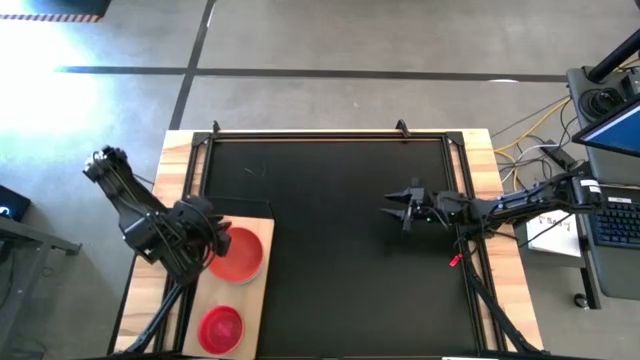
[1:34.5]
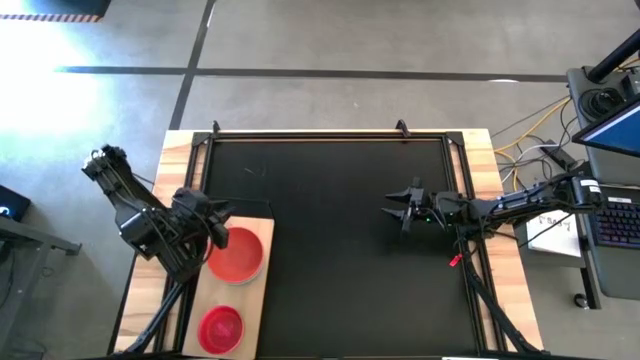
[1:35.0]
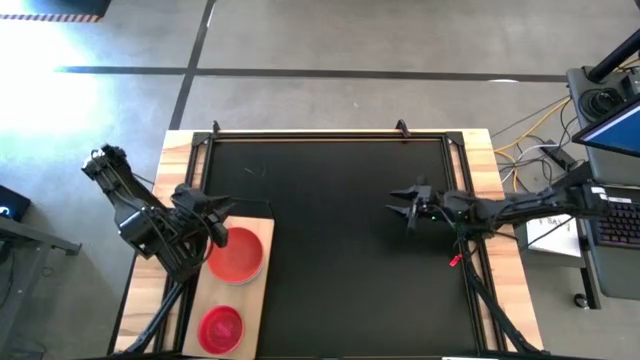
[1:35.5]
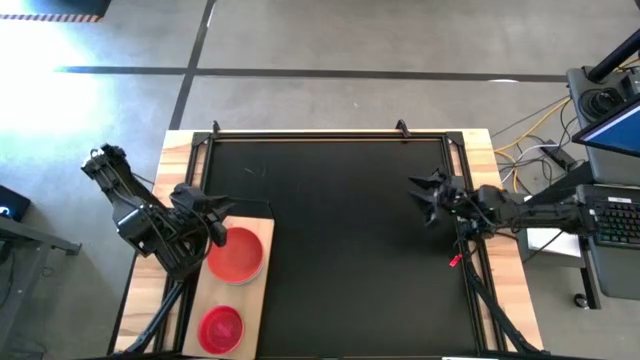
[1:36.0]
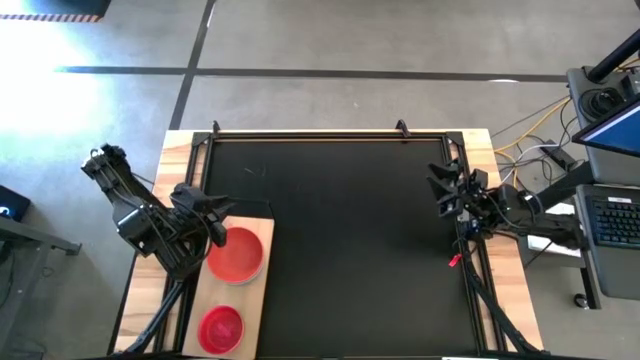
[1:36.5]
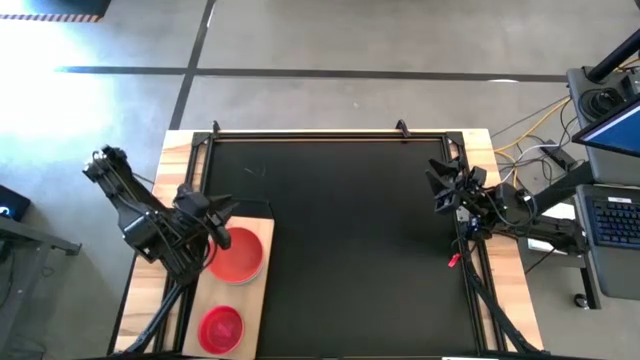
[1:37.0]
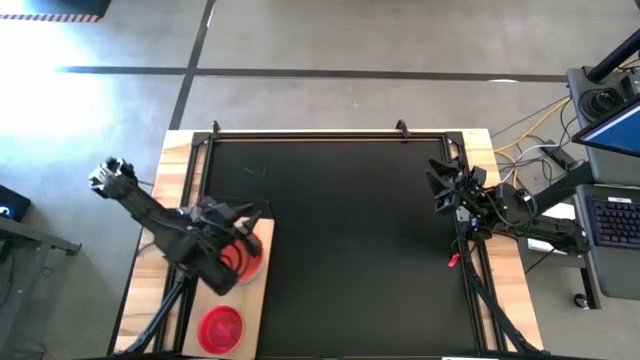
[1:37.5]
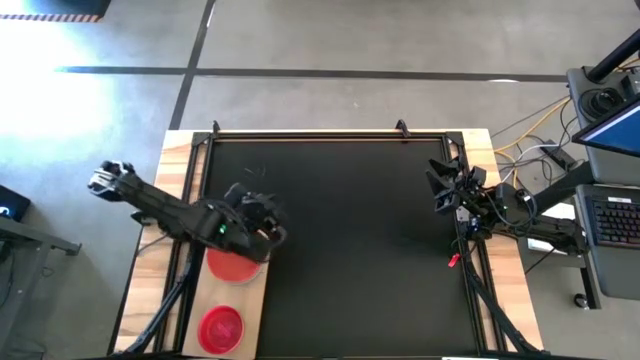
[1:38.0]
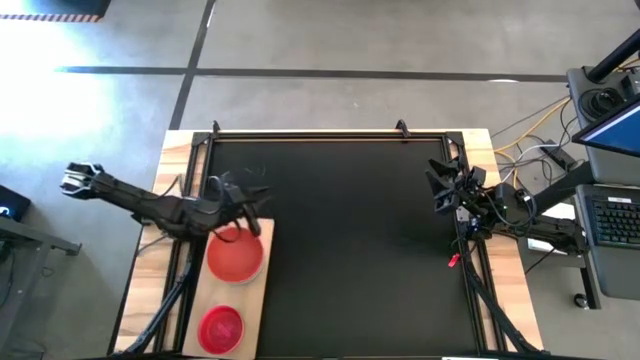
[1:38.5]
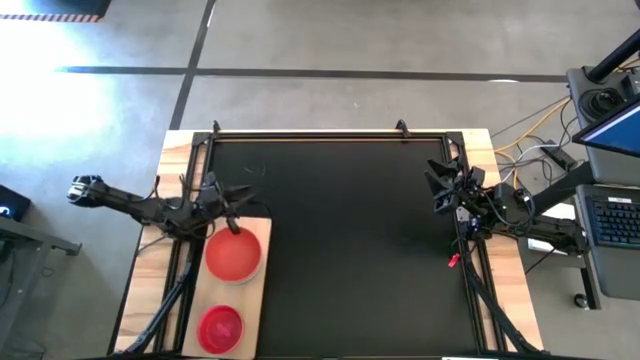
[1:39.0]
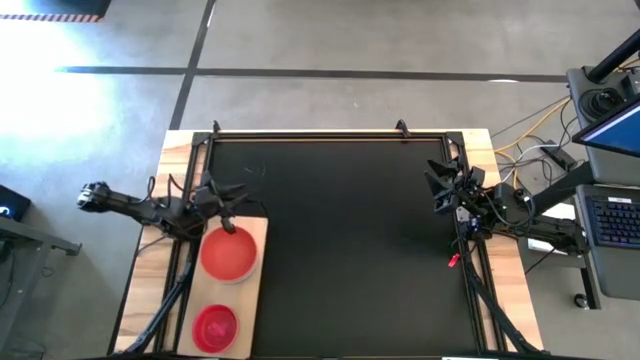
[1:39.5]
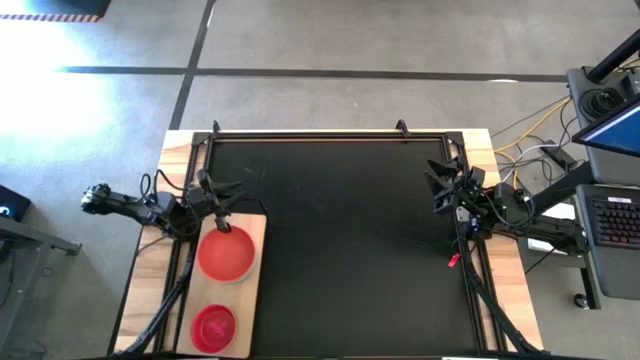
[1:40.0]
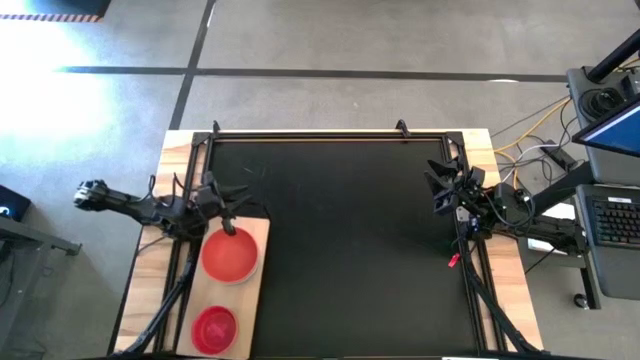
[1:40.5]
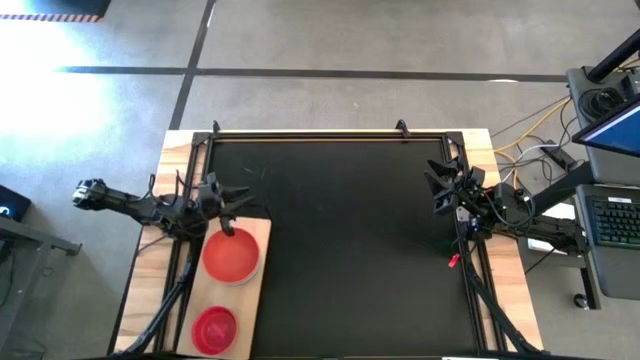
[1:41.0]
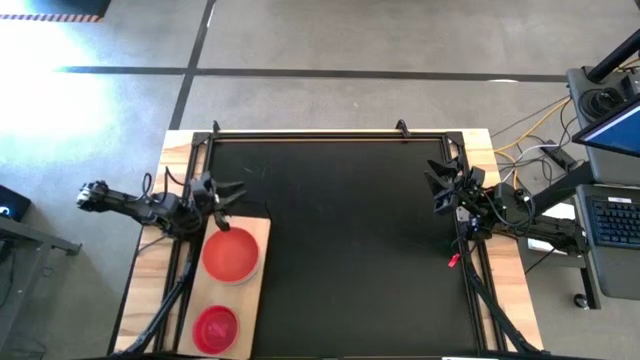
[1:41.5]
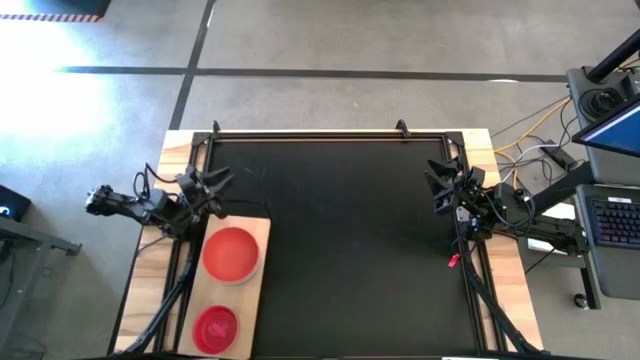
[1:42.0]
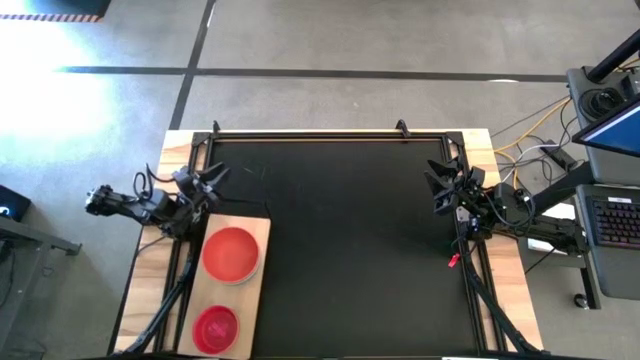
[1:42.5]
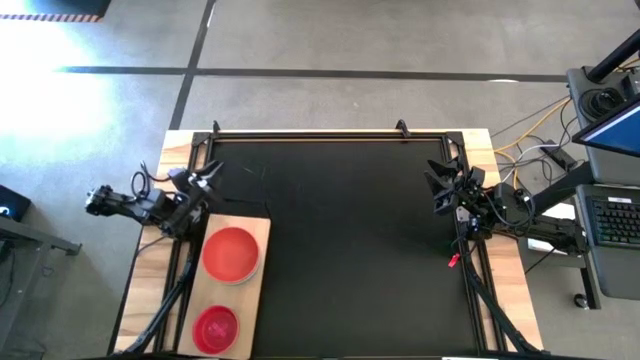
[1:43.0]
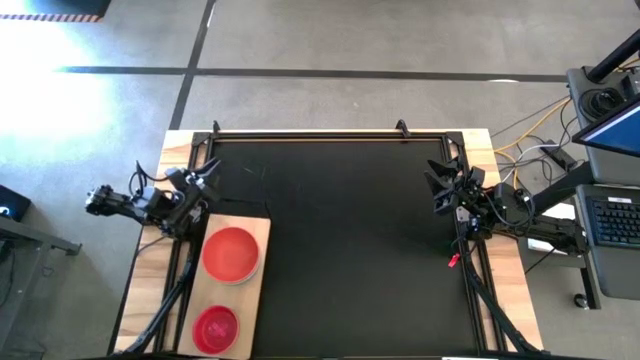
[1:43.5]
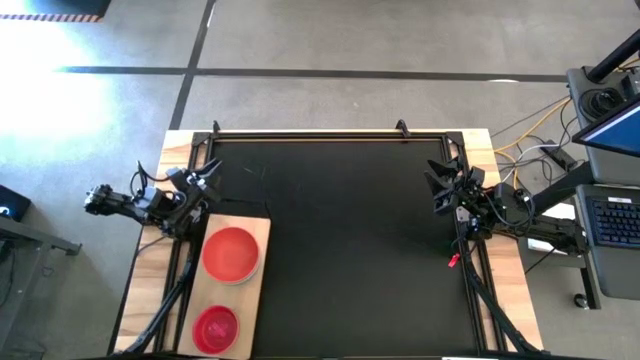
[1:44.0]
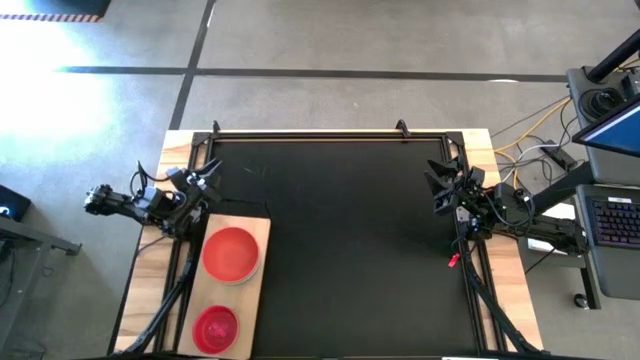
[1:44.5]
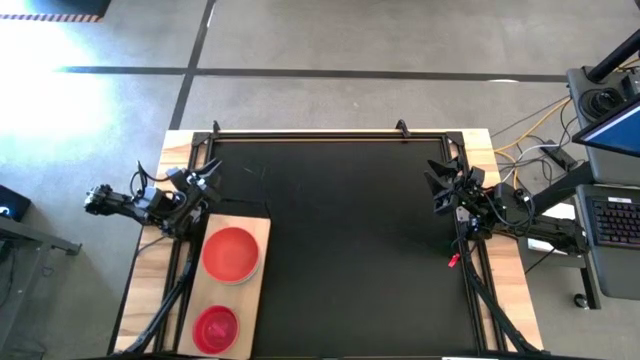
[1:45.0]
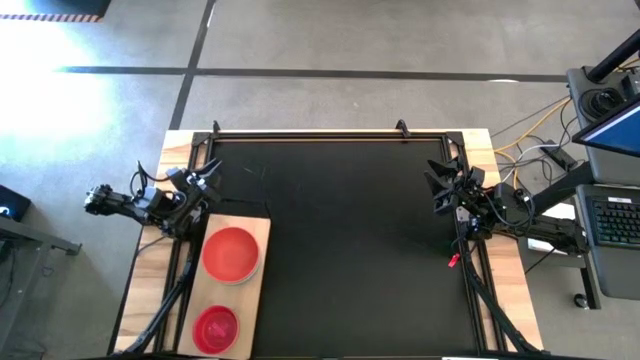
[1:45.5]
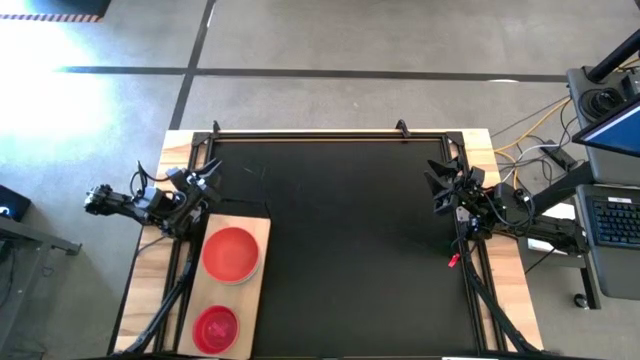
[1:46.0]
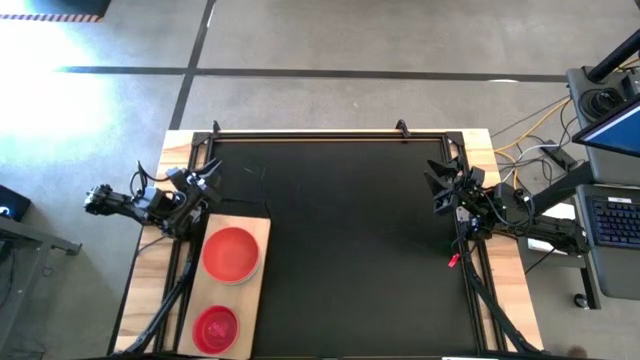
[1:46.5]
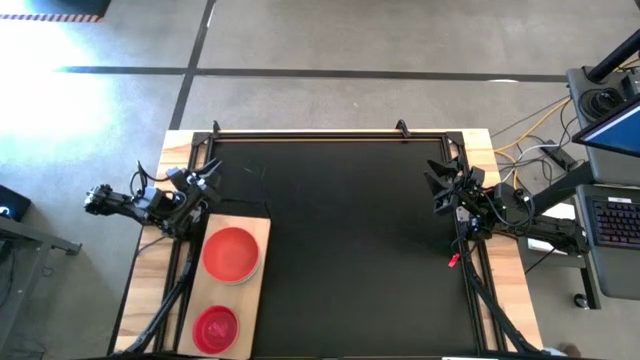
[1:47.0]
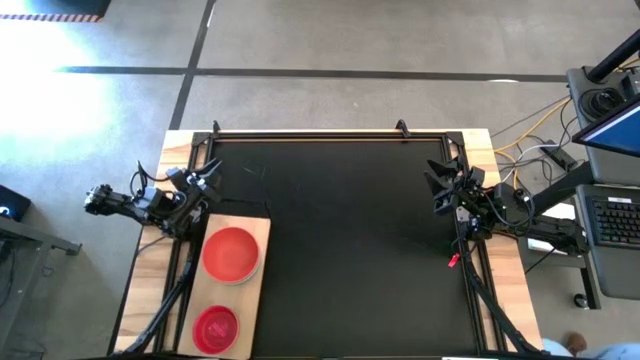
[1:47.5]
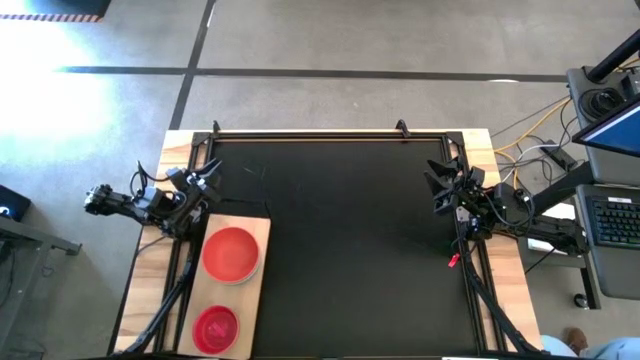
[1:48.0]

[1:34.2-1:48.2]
Task: Place and stack bowls onto a shelf
Return to Home Position

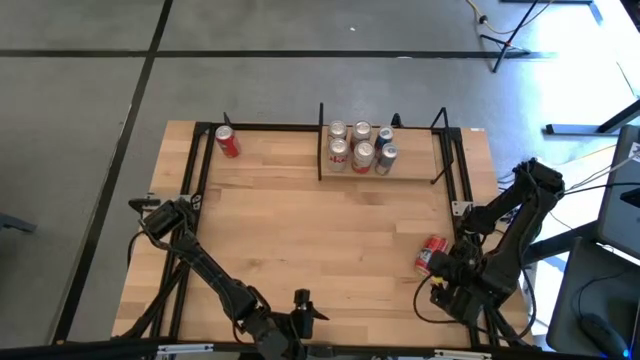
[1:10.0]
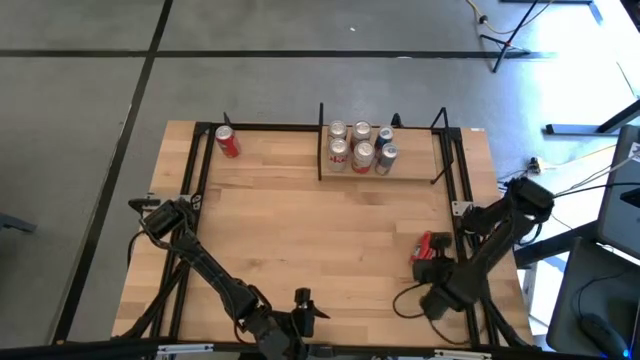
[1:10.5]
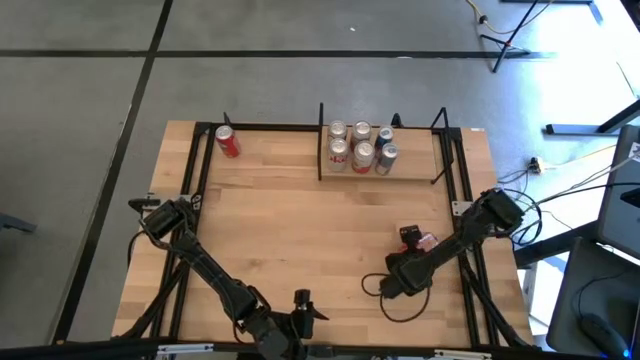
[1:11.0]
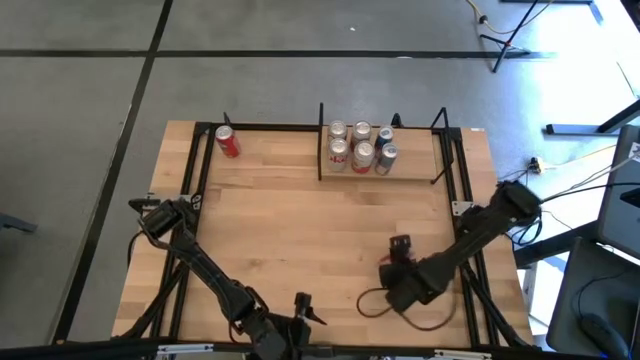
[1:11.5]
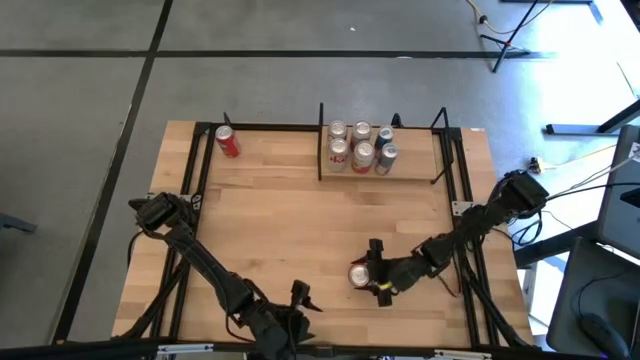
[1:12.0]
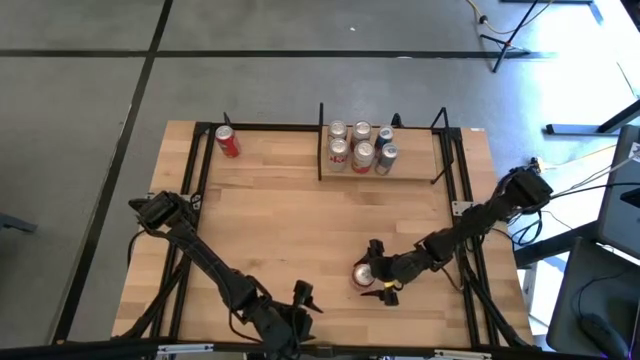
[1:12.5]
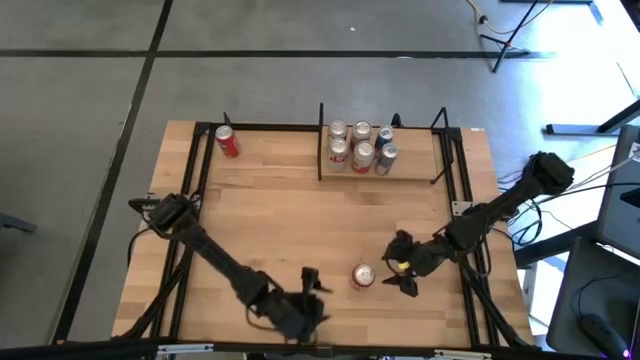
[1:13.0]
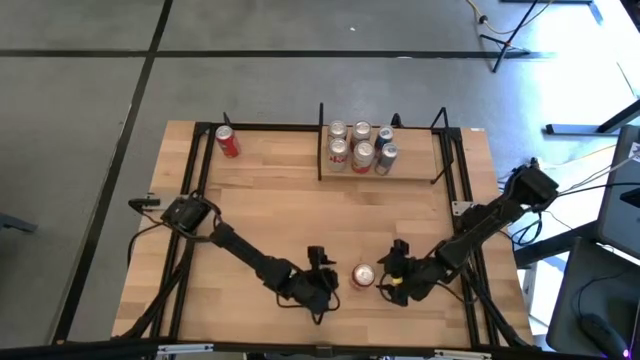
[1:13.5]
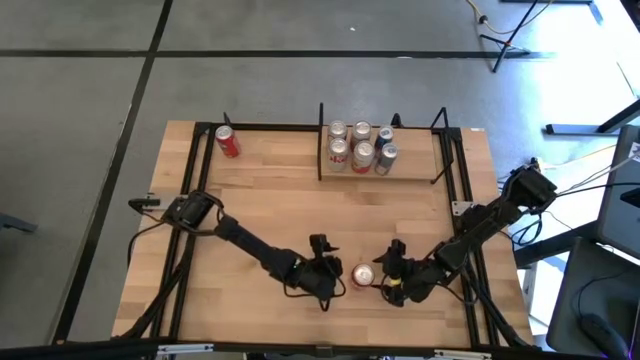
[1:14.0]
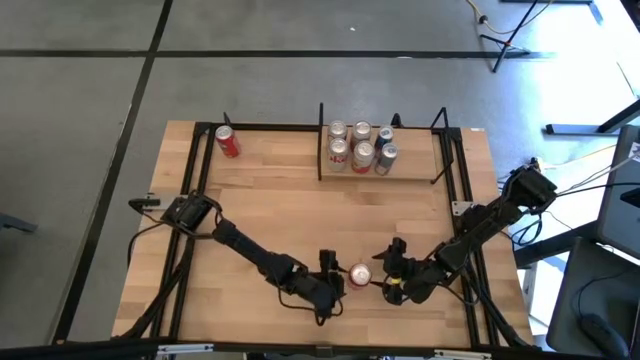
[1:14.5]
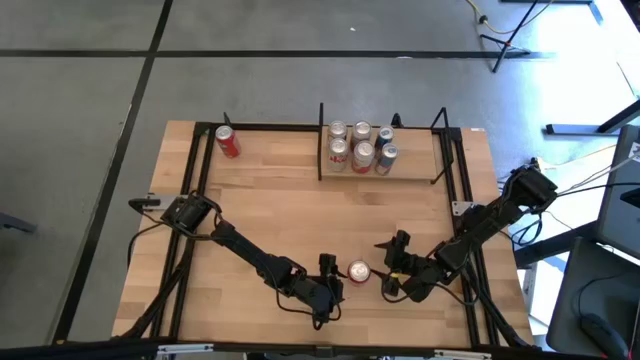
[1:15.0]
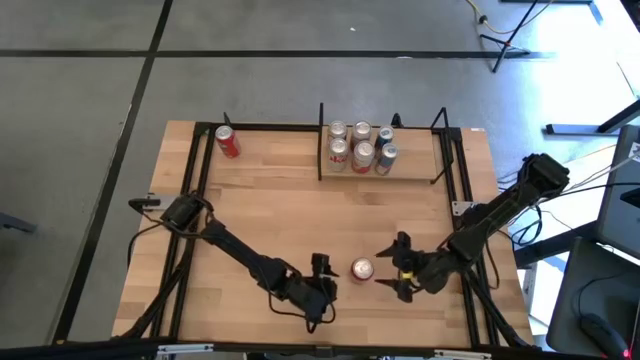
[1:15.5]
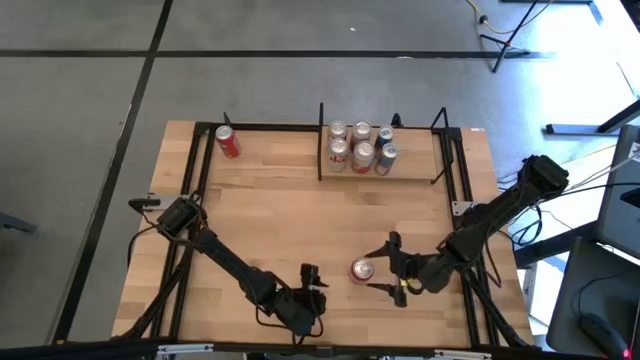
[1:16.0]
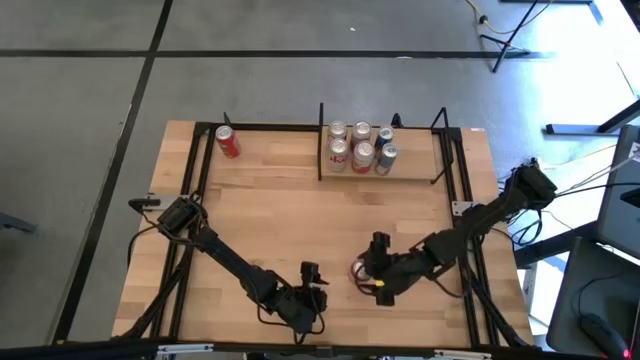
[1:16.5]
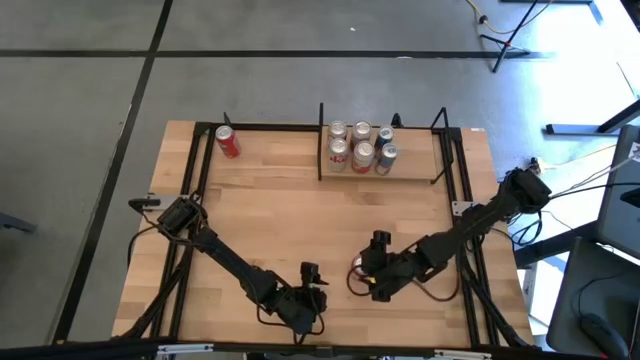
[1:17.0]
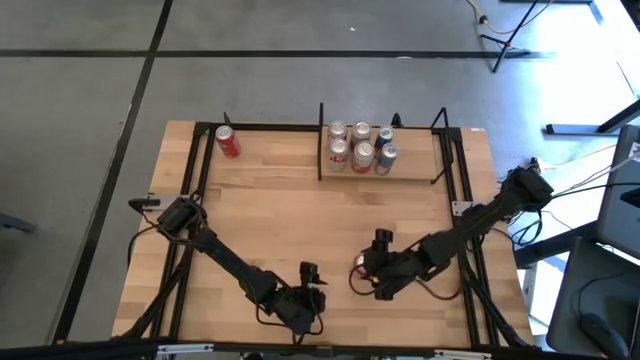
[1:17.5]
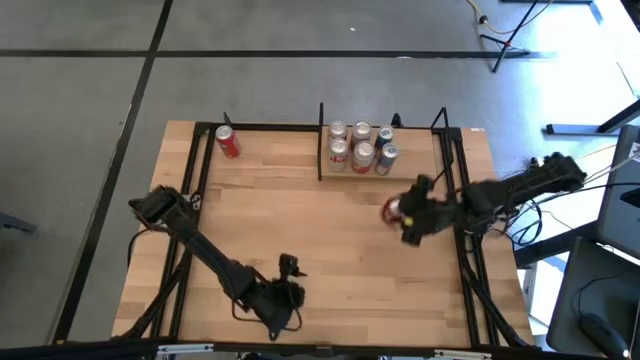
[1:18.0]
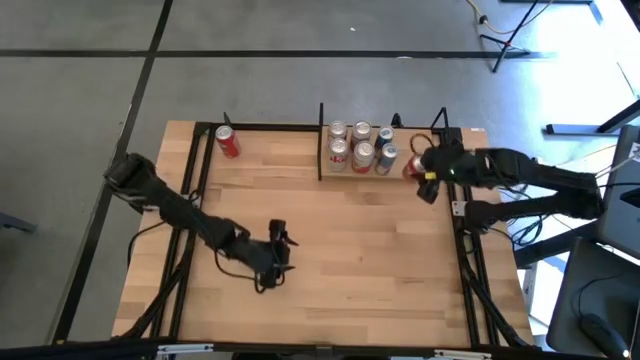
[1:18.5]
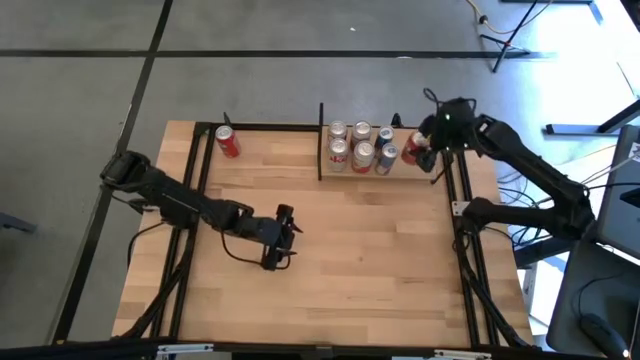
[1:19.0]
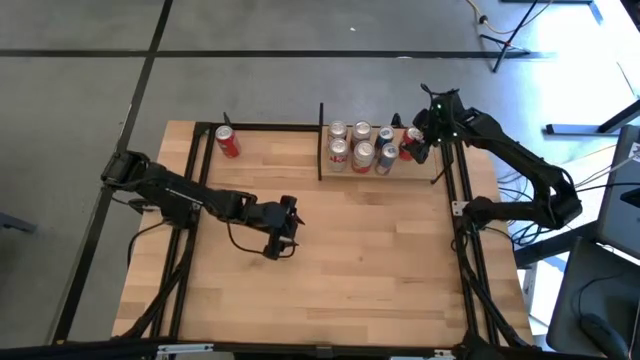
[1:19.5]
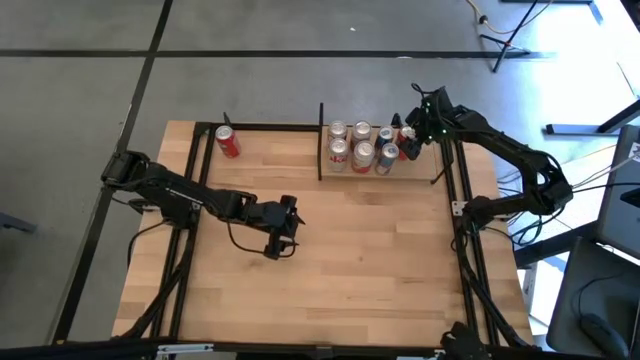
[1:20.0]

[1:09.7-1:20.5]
Task: Place canned beverage on shelf
Put the bottom red soda can on the shelf
